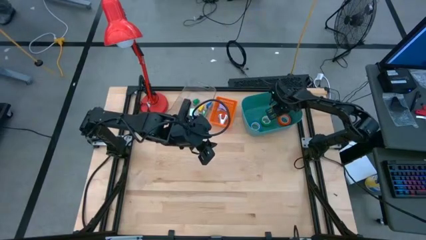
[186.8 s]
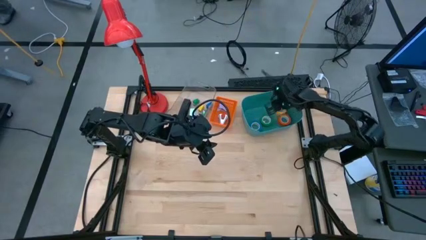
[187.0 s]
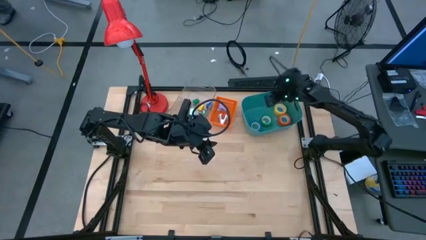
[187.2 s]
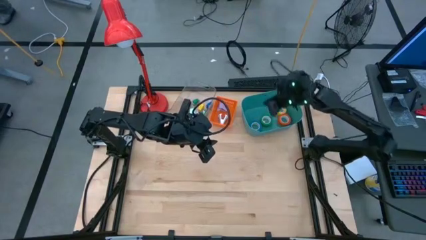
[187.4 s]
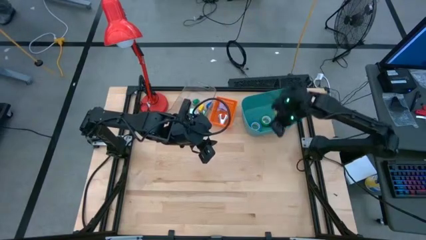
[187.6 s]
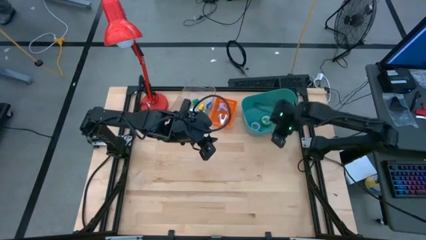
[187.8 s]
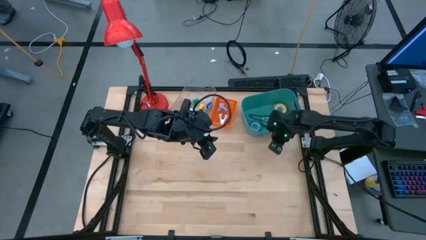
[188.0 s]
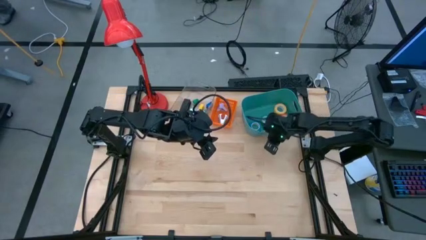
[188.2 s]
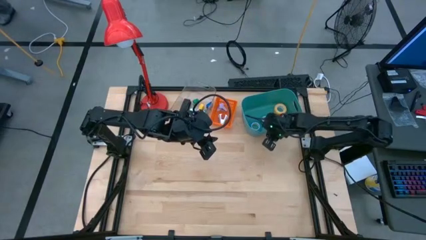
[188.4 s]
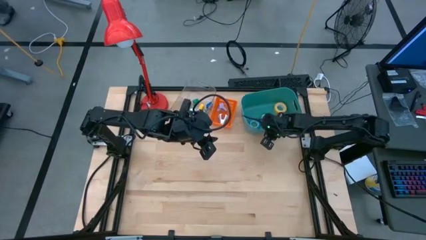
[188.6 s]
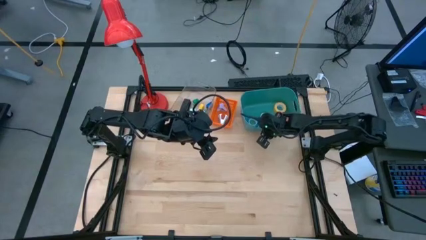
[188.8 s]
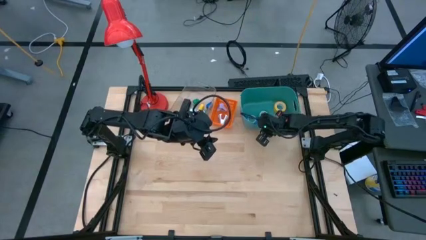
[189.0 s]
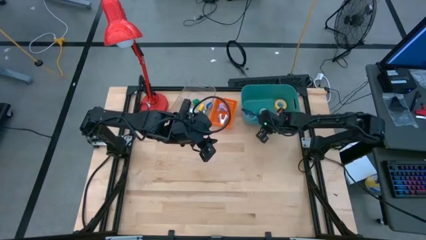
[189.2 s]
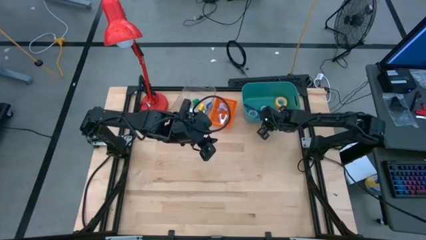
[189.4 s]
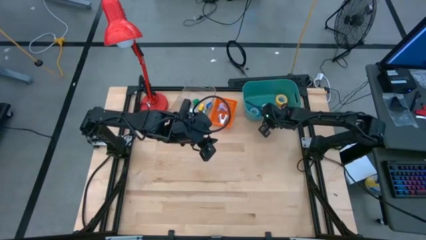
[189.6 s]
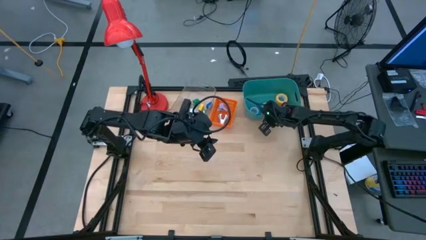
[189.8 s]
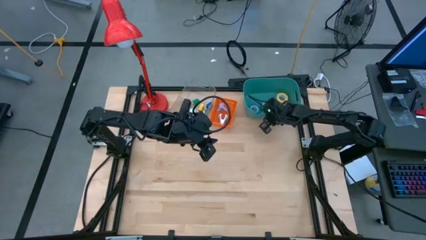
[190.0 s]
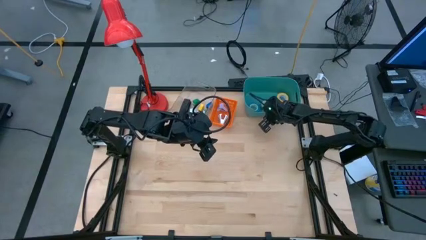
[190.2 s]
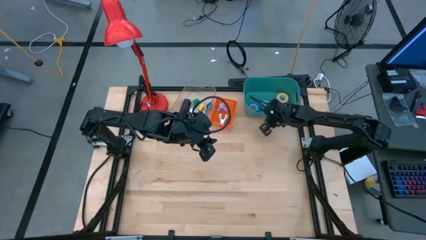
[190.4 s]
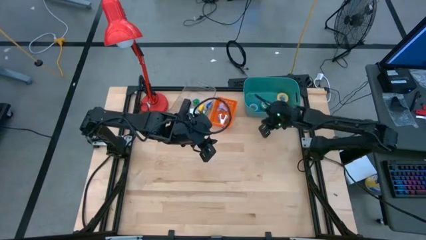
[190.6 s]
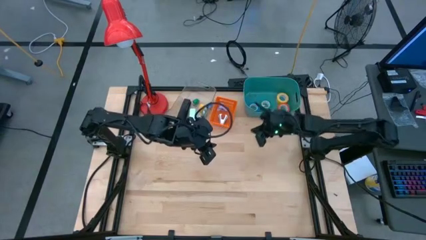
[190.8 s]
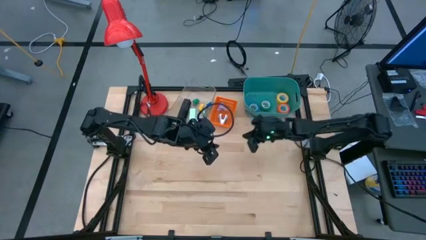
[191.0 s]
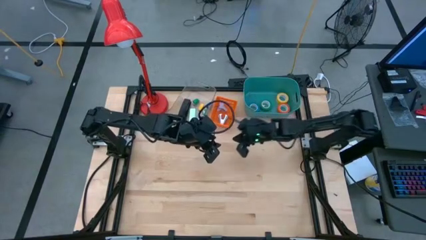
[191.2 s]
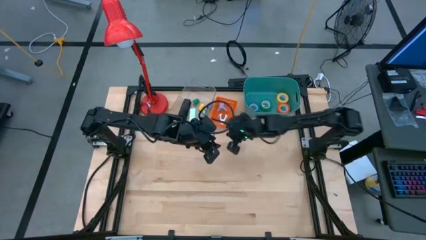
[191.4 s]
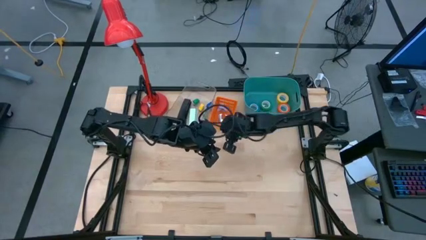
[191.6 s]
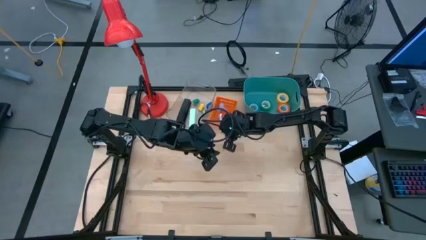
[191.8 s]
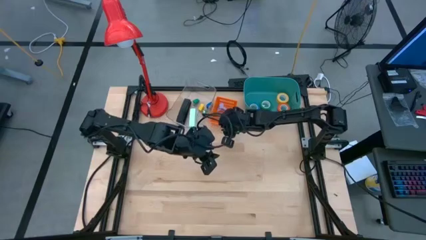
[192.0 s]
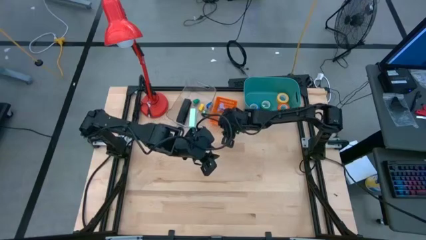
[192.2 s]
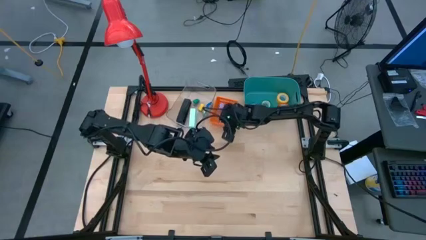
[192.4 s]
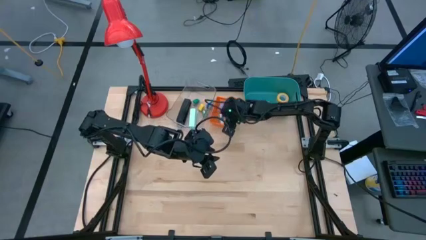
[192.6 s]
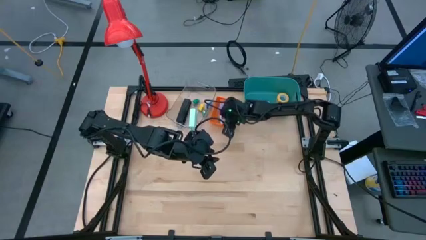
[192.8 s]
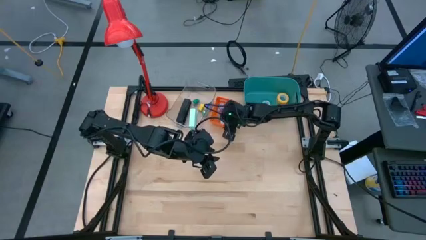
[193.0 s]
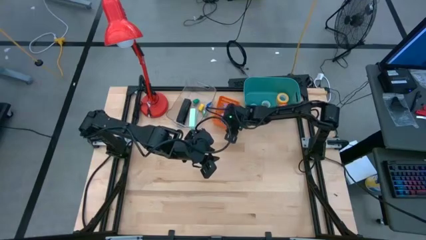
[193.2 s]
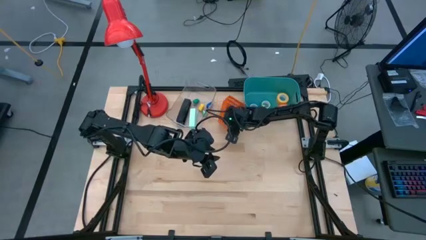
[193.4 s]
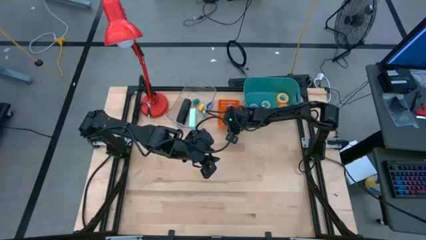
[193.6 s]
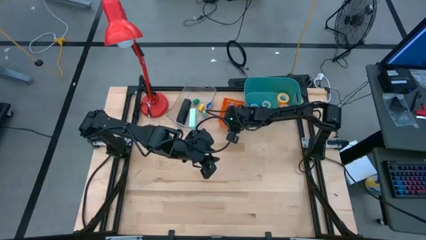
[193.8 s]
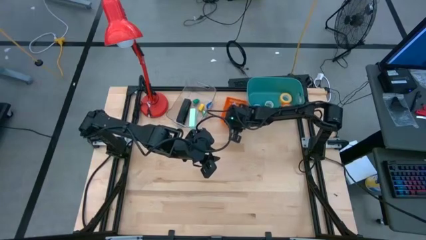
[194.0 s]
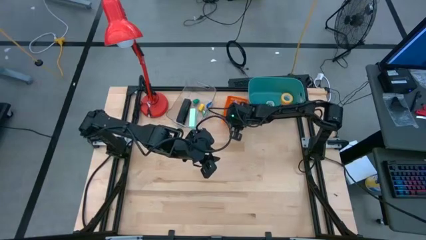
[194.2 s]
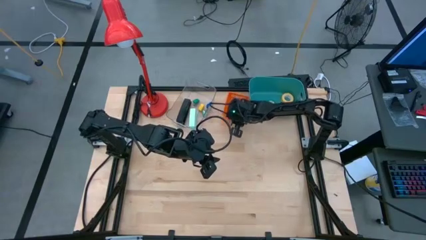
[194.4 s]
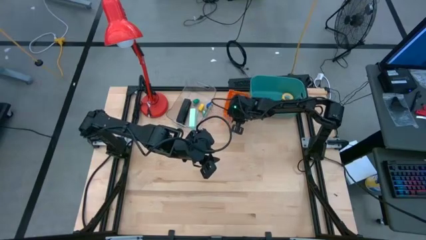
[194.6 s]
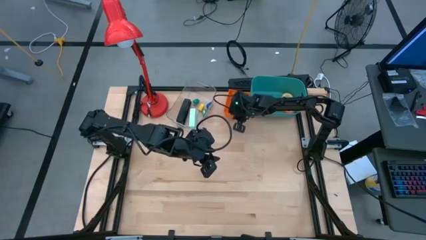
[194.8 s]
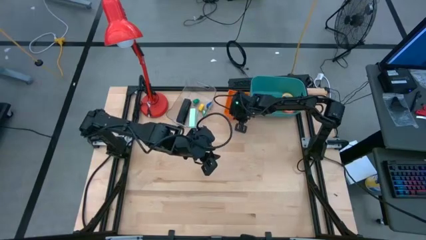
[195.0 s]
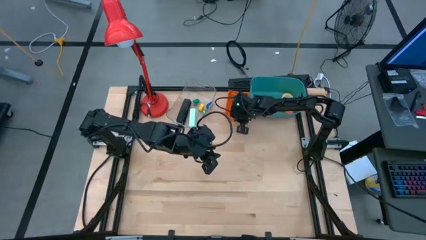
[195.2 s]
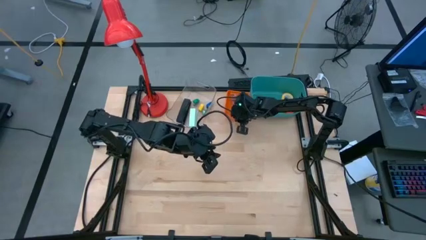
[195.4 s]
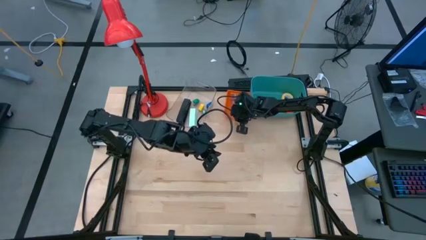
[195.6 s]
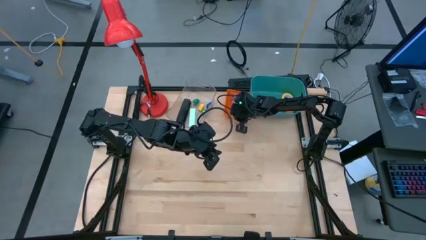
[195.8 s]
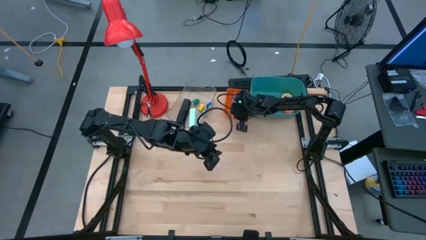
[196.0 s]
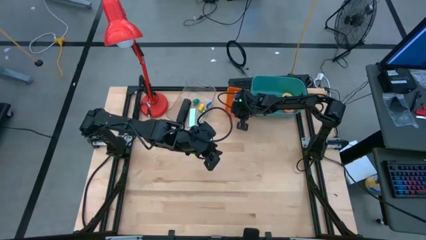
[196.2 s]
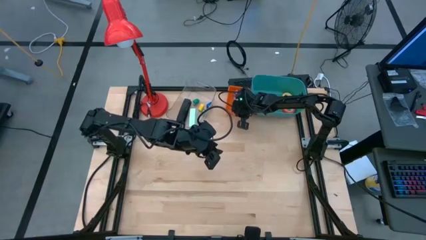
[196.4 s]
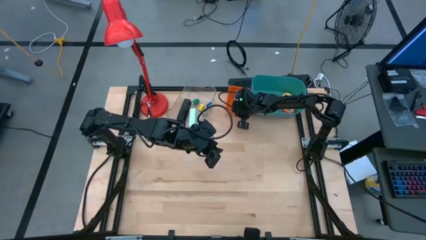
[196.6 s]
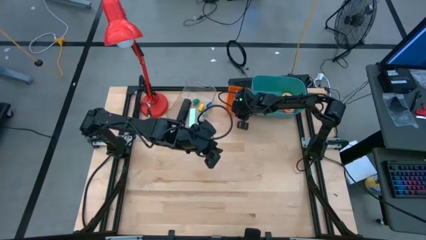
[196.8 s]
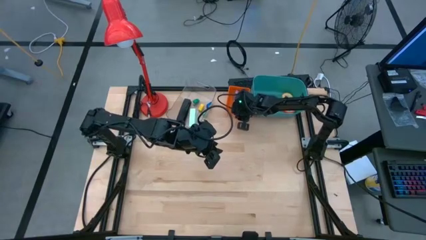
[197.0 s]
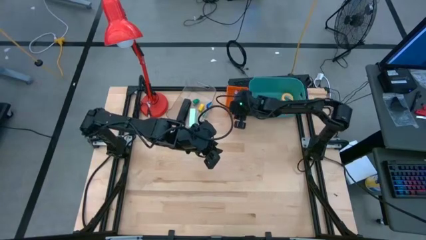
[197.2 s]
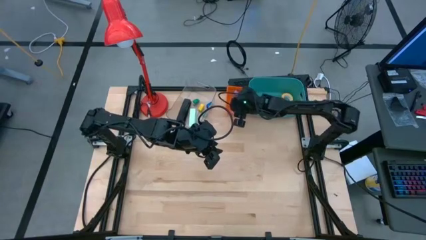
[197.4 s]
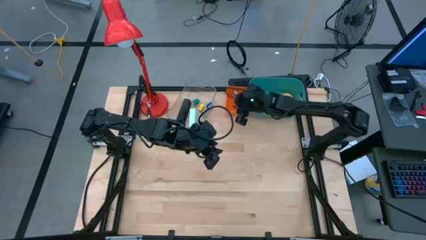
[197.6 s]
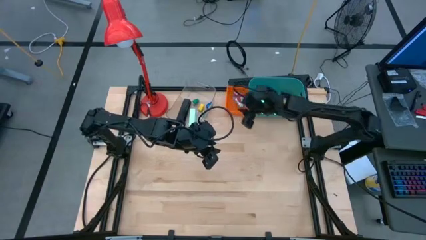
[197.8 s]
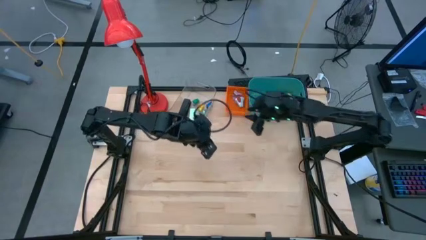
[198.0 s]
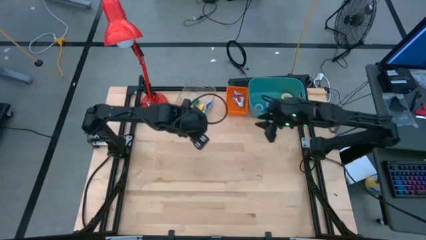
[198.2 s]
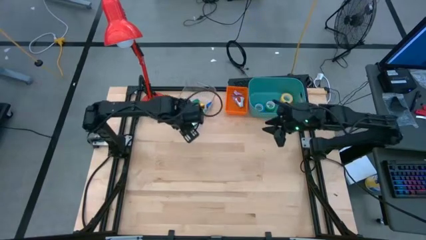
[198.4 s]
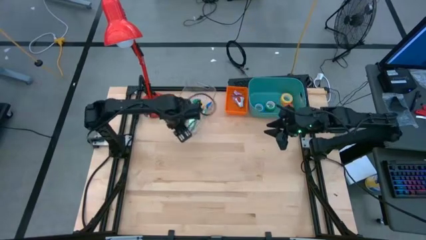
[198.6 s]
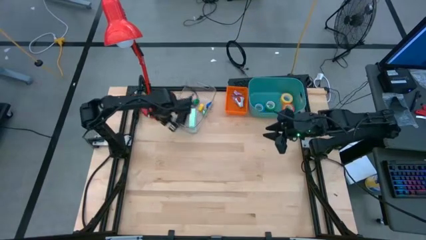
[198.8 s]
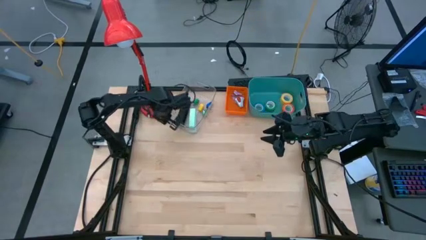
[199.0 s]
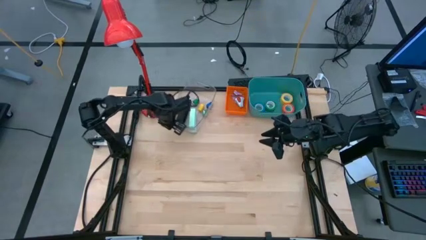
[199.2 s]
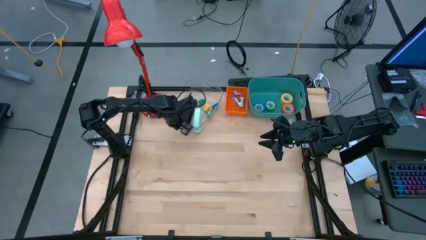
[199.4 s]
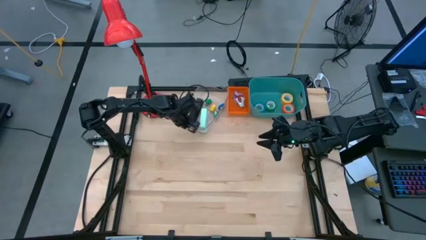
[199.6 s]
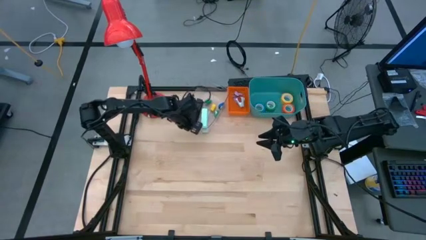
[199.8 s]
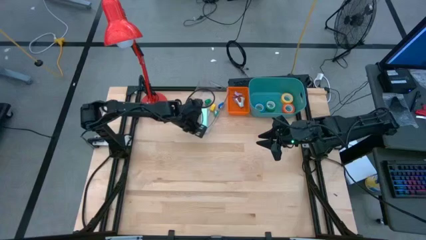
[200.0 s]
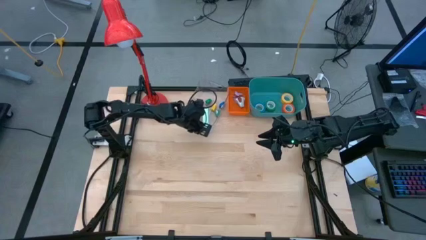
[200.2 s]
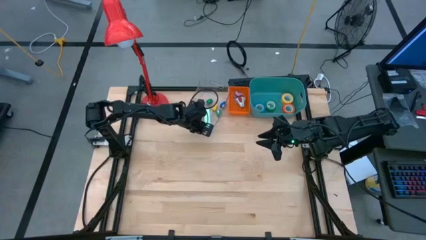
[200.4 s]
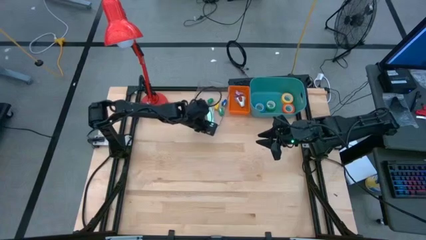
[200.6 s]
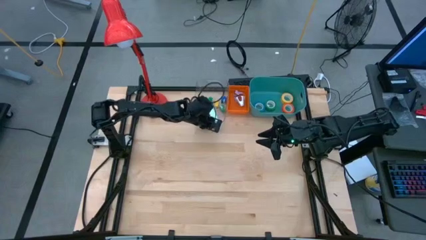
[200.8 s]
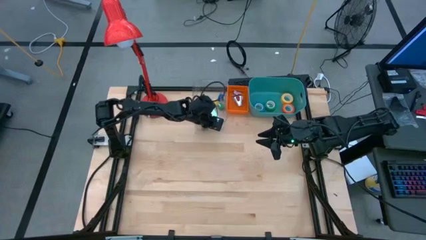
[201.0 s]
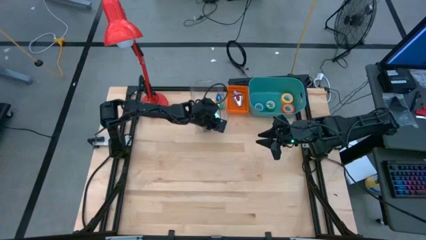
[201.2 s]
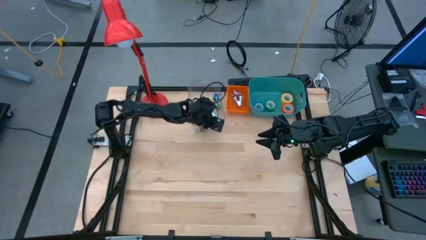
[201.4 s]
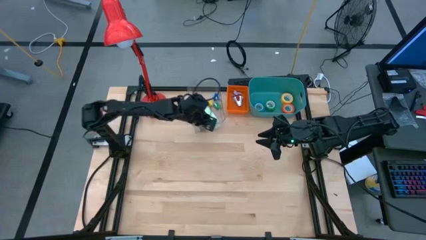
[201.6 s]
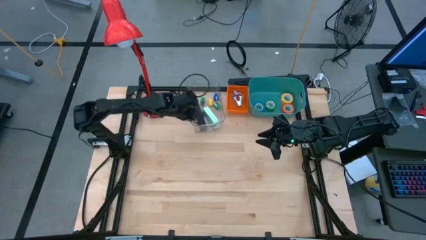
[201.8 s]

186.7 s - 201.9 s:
Task: Pick and place Stapler, Stapler remover, tape
Adjust the bins
